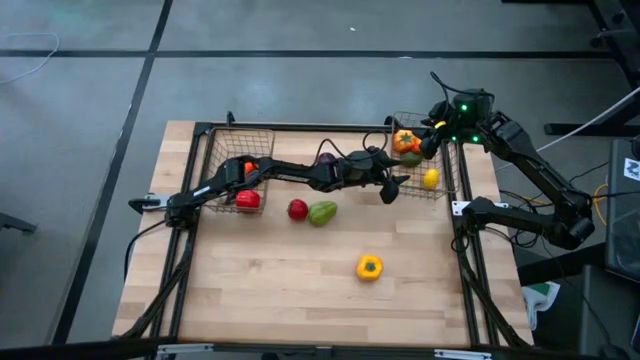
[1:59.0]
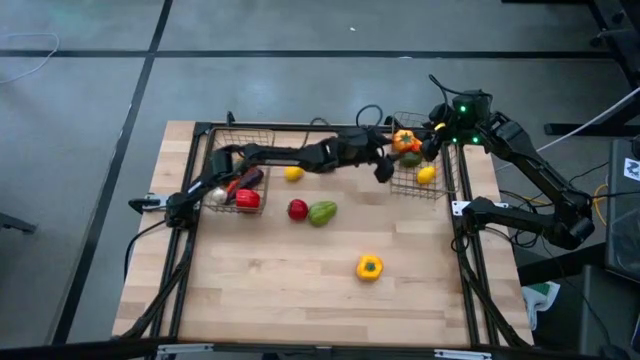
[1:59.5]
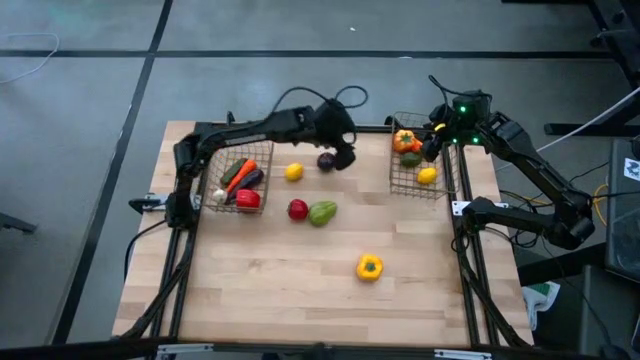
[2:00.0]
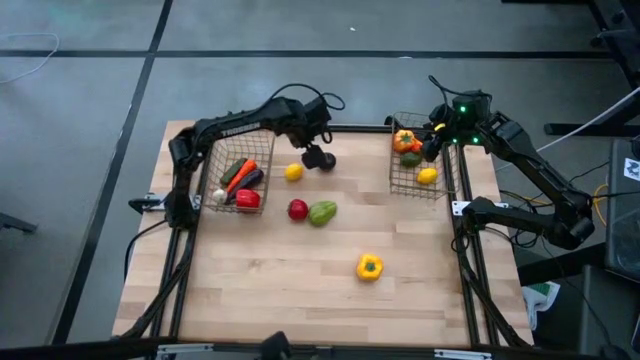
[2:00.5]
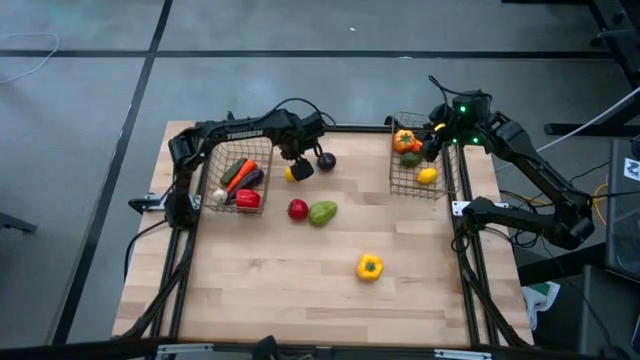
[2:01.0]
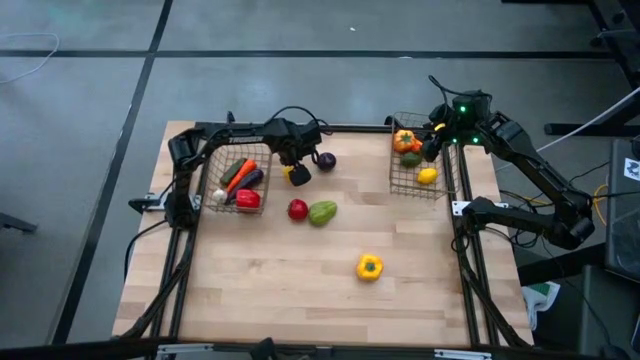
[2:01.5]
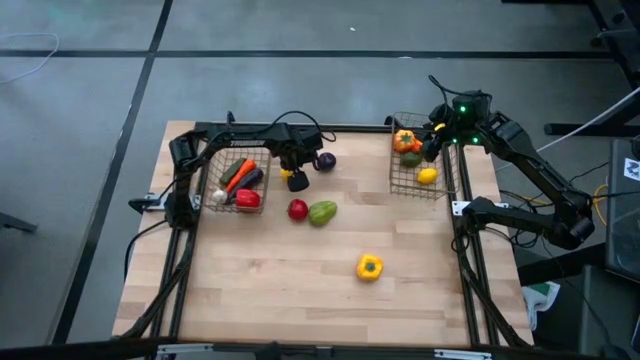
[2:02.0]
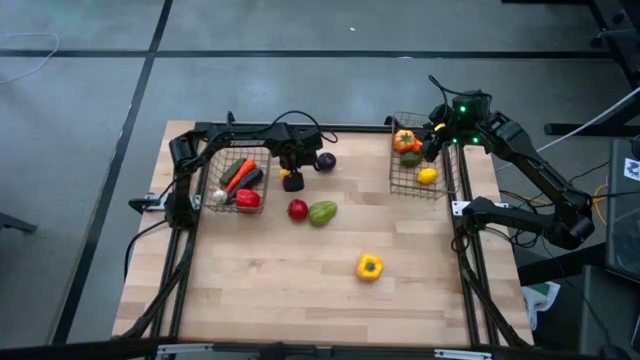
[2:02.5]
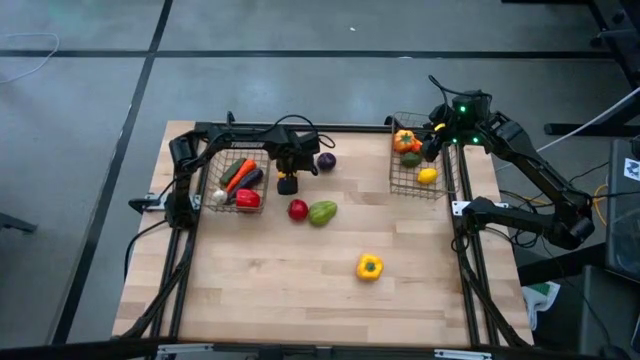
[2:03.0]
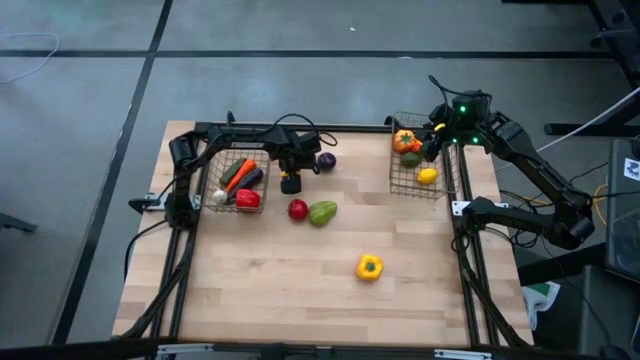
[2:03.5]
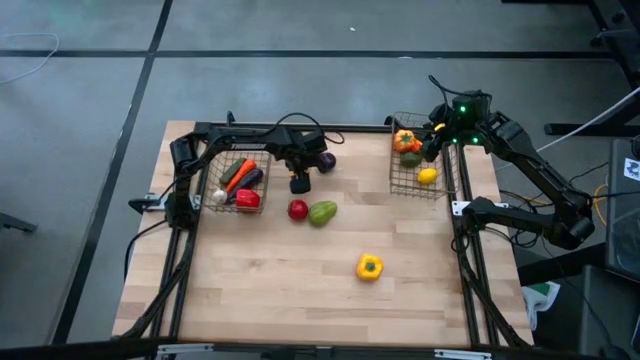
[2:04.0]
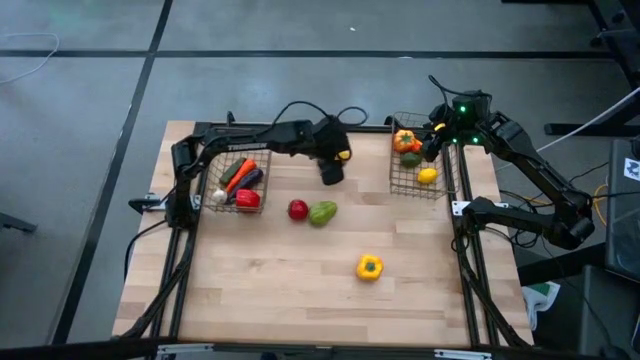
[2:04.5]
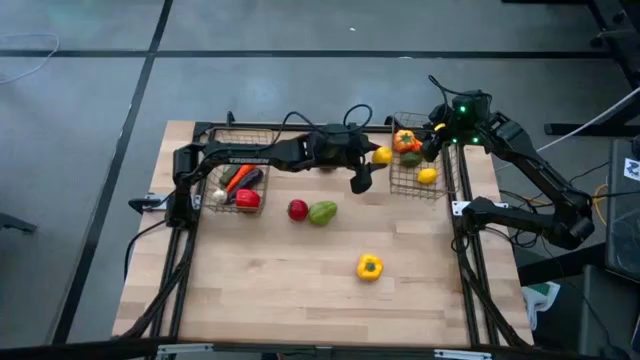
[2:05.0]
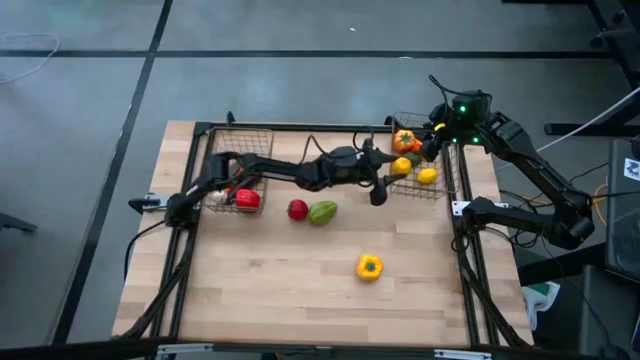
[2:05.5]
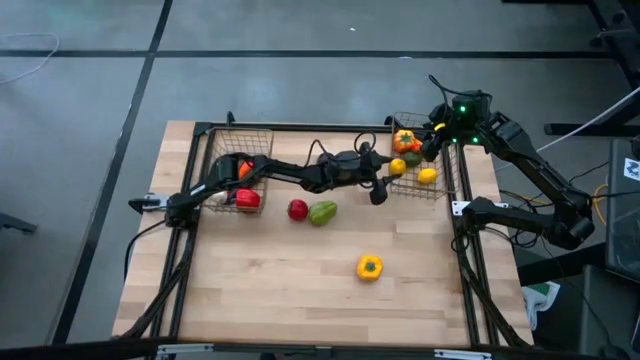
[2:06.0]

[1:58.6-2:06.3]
Task: Sort produce into baskets
Put the yellow lemon into the right gold wire basket

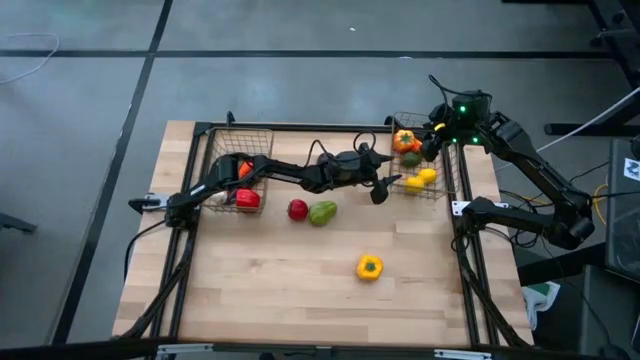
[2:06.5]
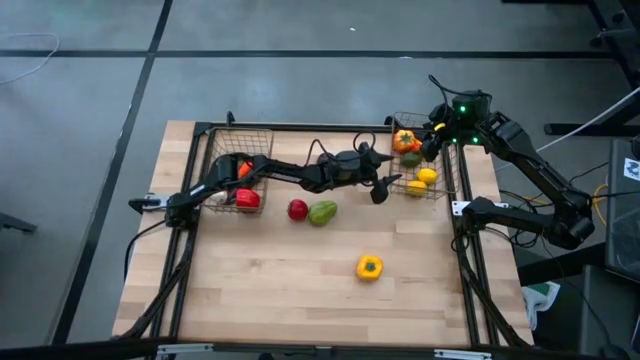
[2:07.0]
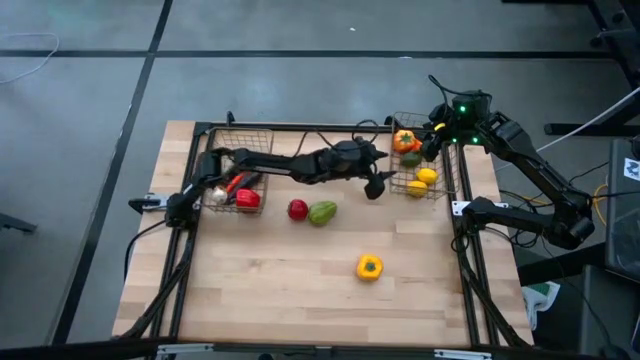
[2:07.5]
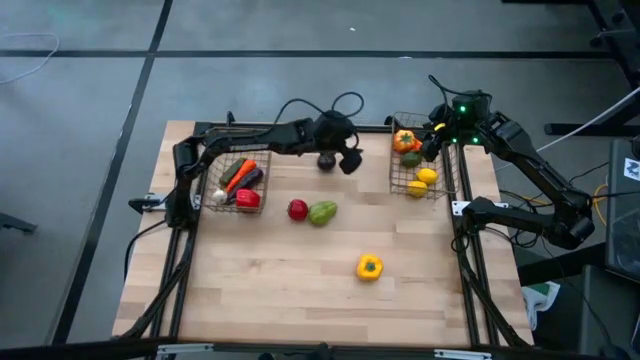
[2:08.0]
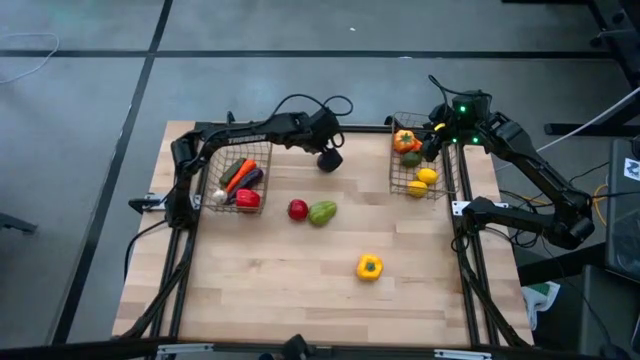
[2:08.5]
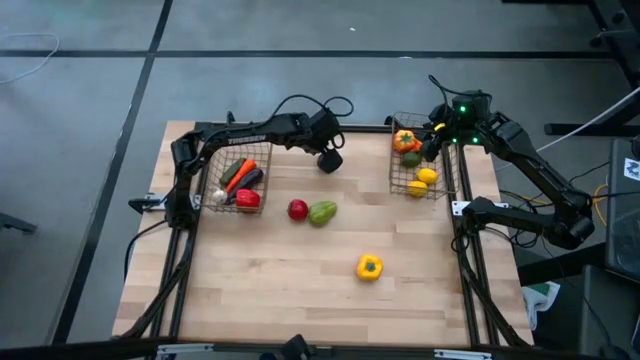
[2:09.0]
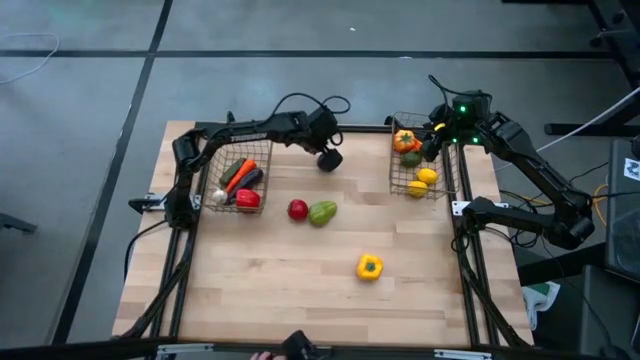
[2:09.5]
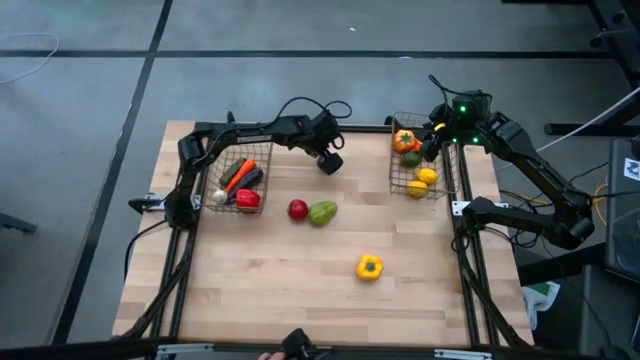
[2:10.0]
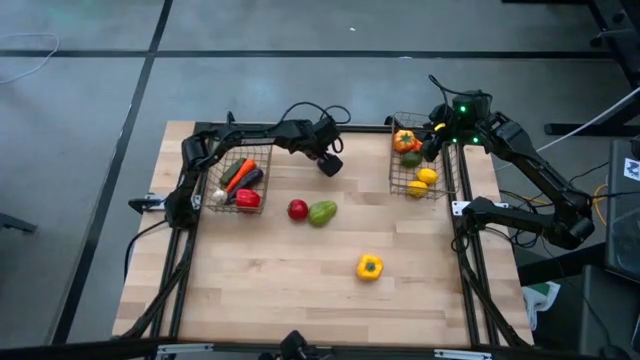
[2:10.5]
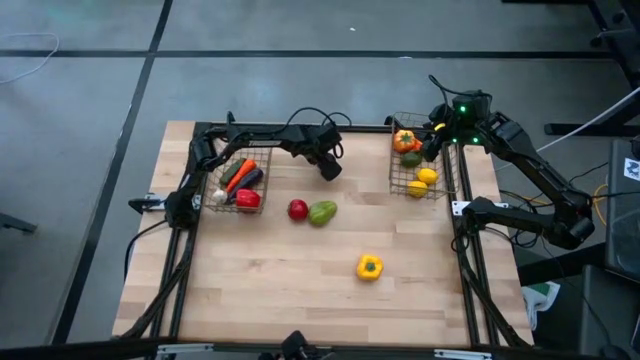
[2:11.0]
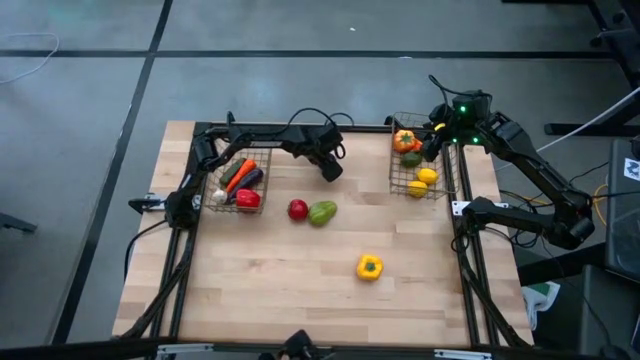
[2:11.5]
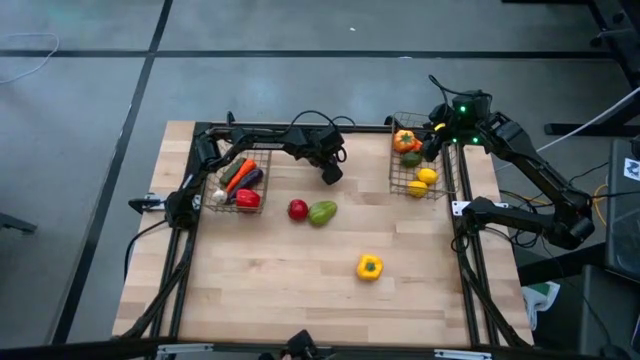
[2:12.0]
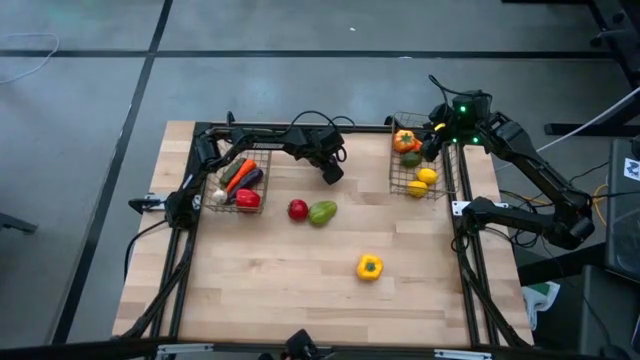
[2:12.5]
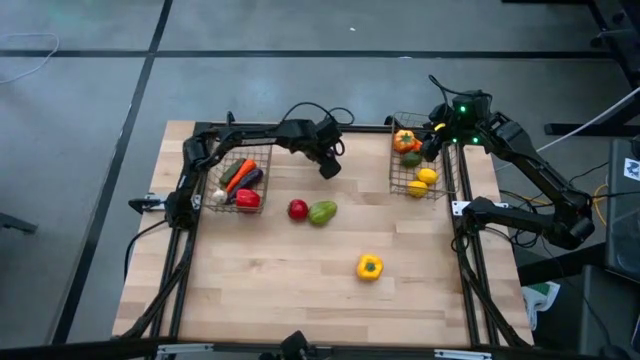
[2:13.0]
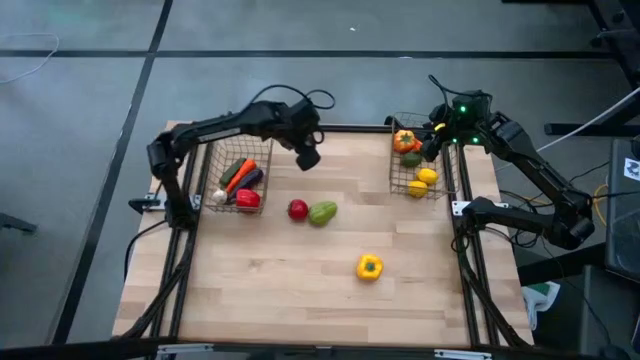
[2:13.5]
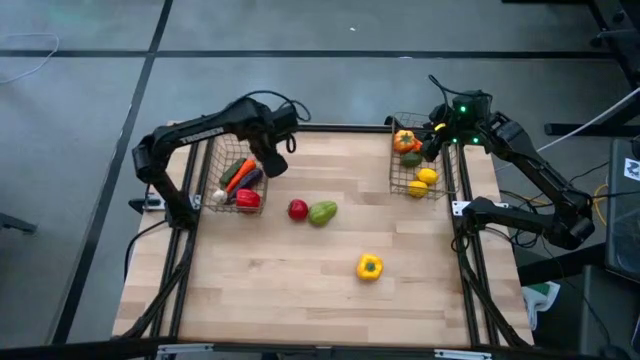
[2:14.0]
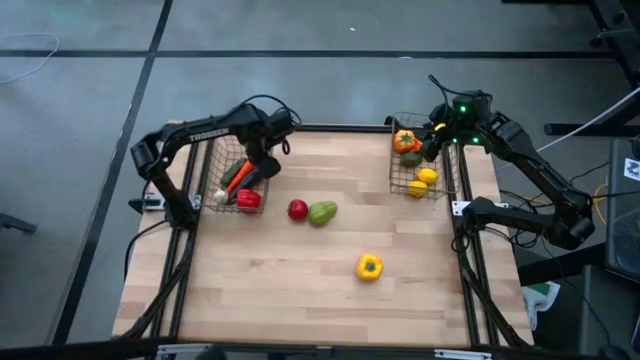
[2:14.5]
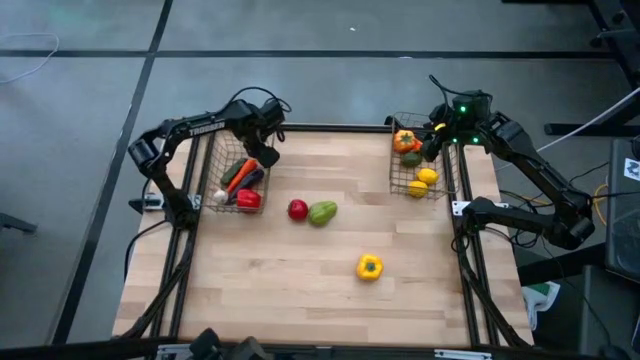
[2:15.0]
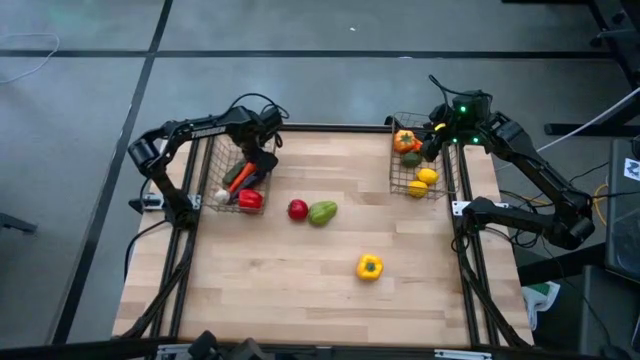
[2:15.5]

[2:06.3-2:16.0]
Put the violet onion into the left gold wire basket

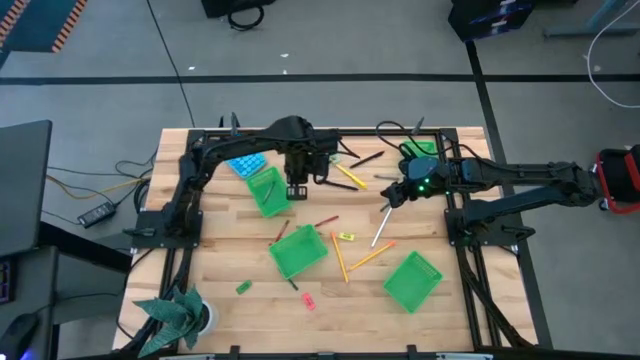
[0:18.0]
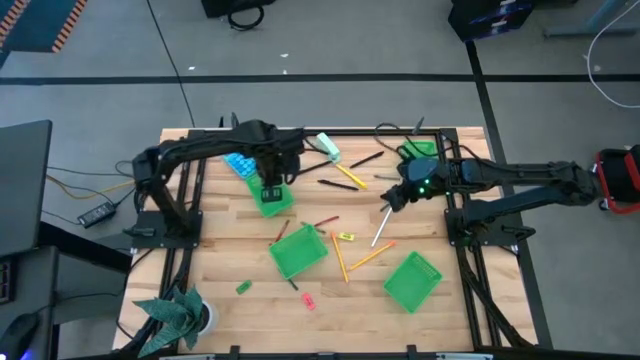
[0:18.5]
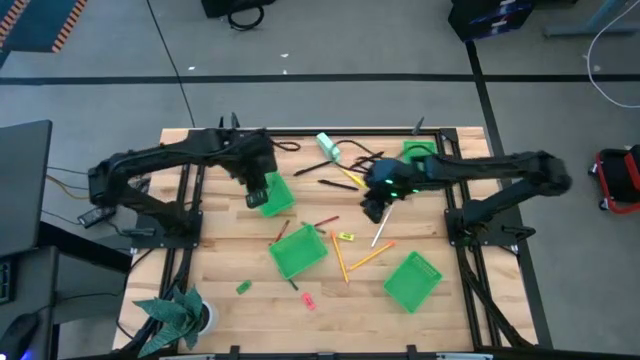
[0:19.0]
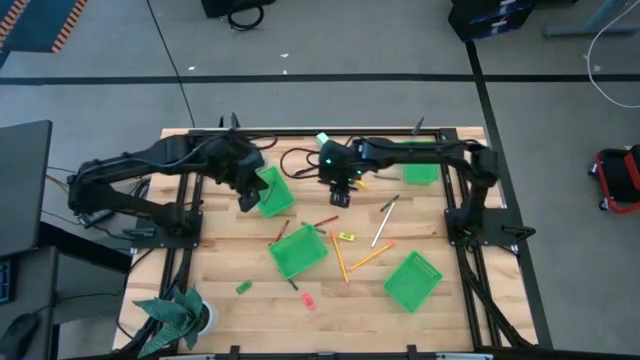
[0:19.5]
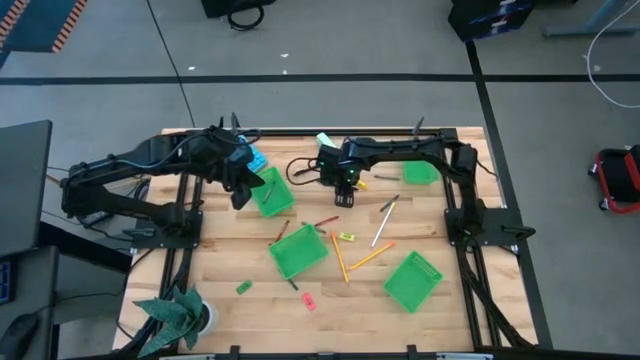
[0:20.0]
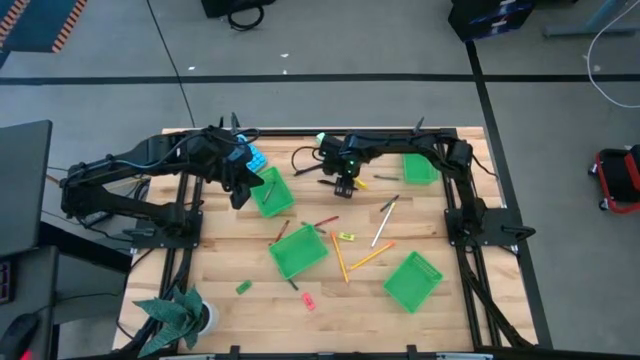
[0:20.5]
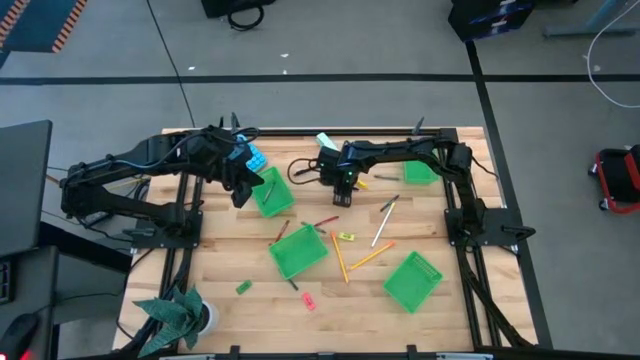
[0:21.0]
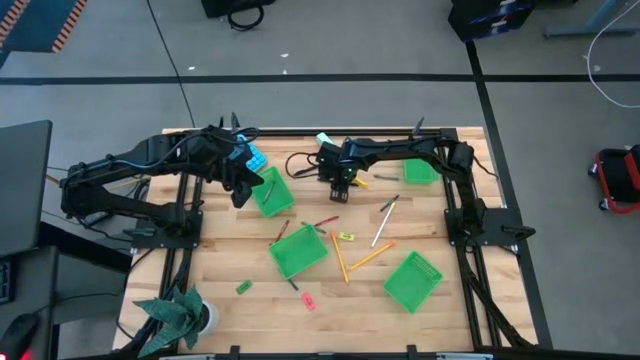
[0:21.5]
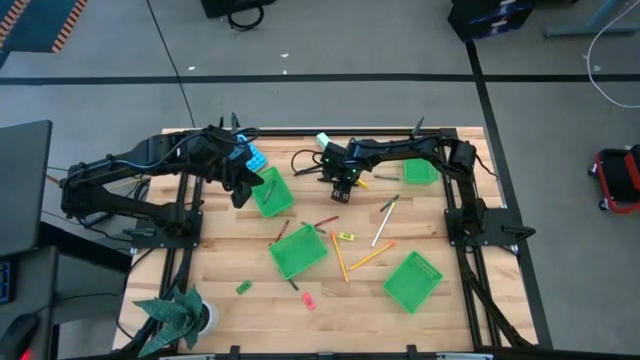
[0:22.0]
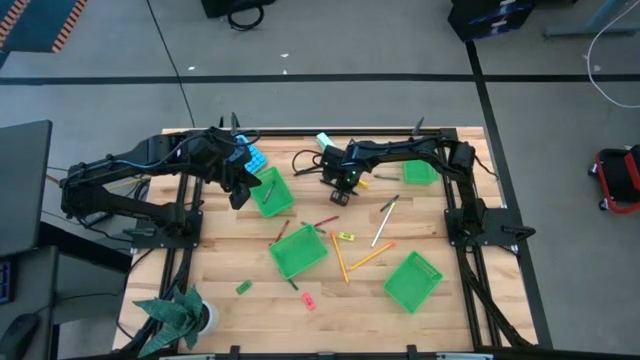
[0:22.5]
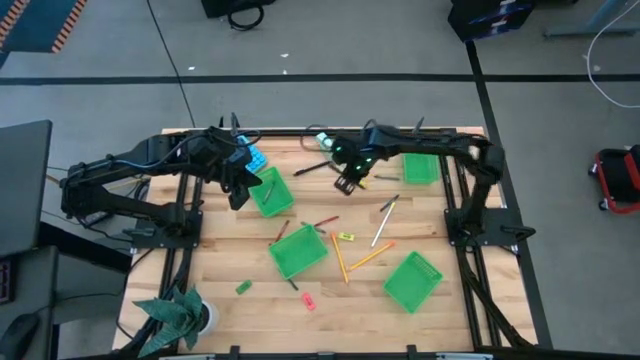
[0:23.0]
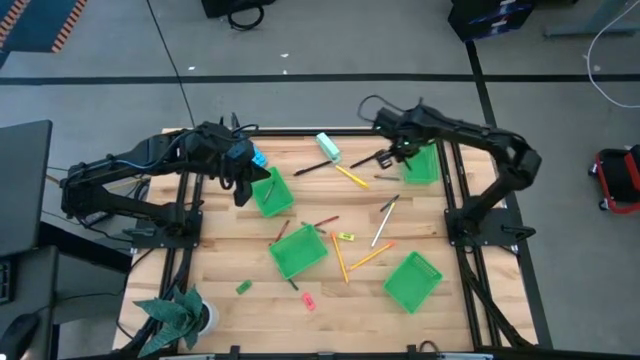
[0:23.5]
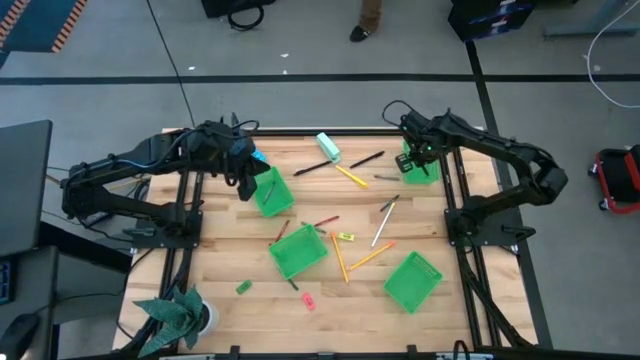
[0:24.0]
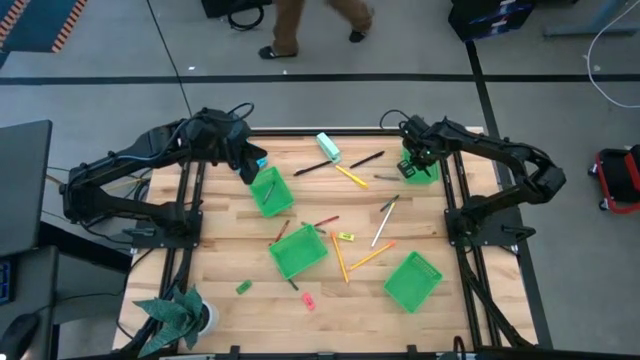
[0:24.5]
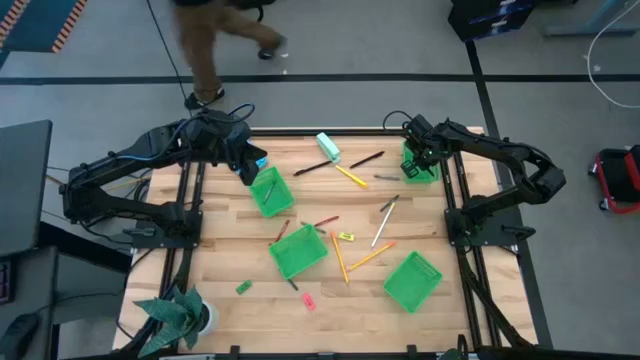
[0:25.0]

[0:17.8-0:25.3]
Task: Sort crayons/erasers/pens/pencils in bins
Put the bottom black pen into the top right green bin
